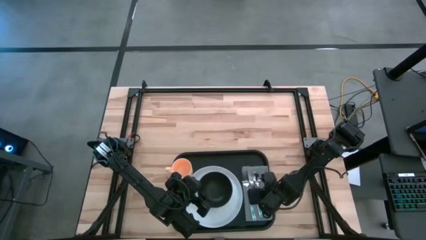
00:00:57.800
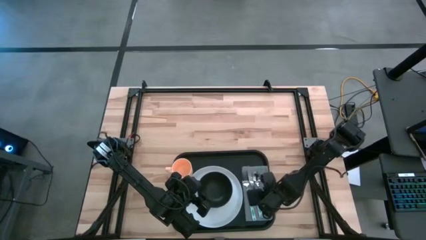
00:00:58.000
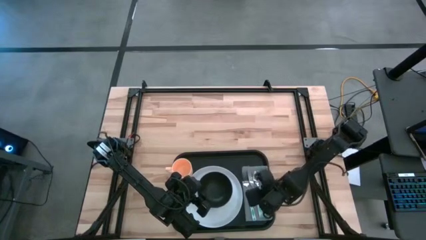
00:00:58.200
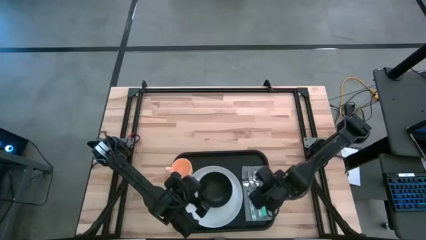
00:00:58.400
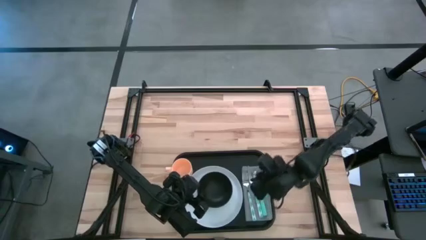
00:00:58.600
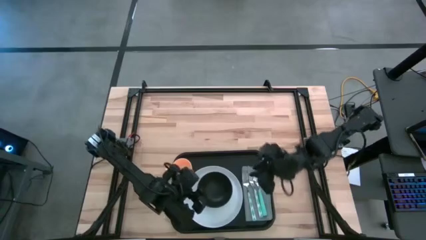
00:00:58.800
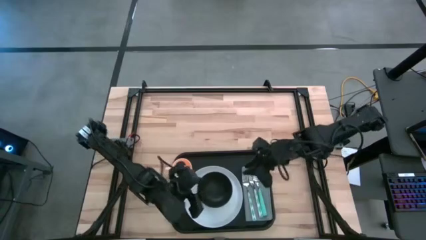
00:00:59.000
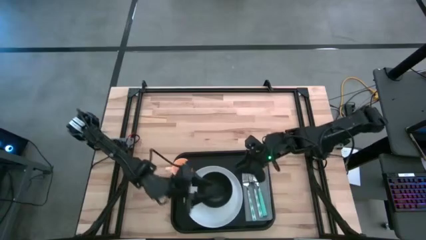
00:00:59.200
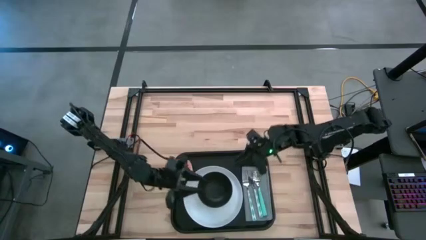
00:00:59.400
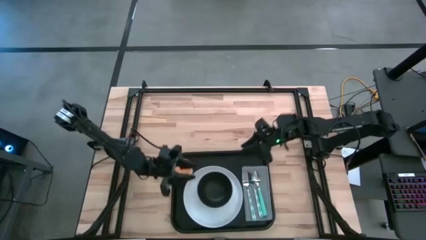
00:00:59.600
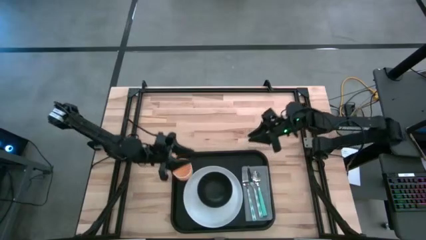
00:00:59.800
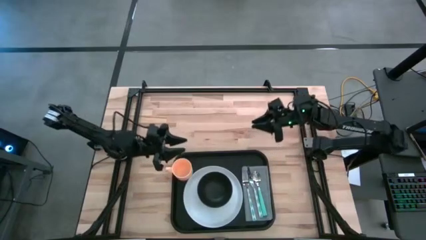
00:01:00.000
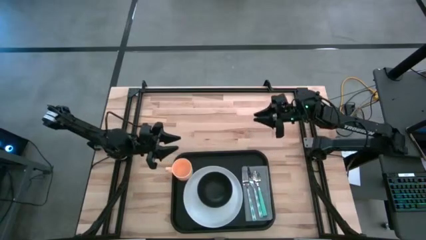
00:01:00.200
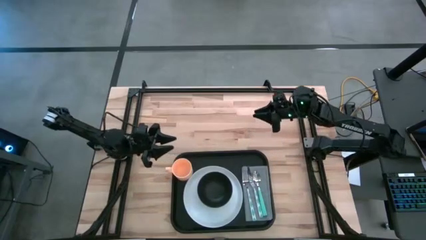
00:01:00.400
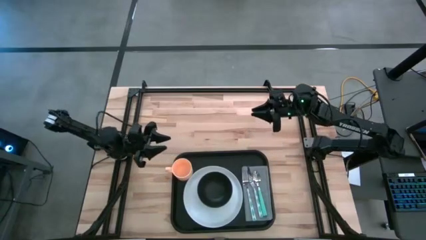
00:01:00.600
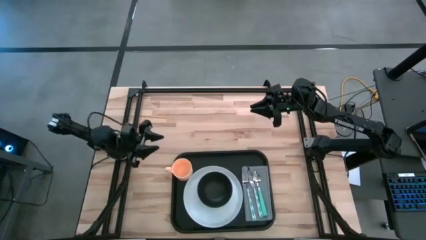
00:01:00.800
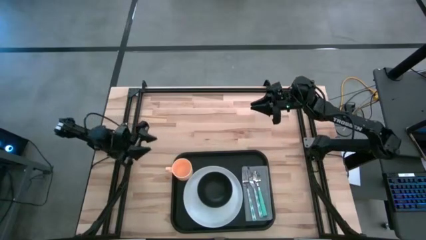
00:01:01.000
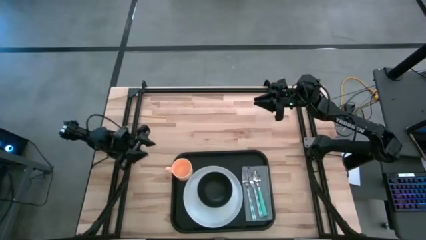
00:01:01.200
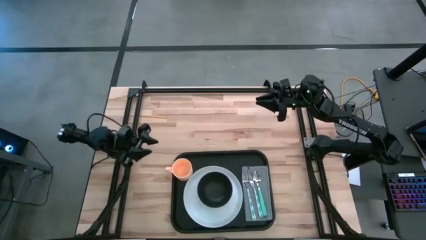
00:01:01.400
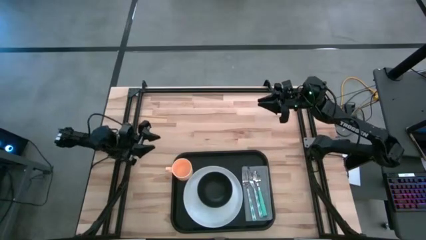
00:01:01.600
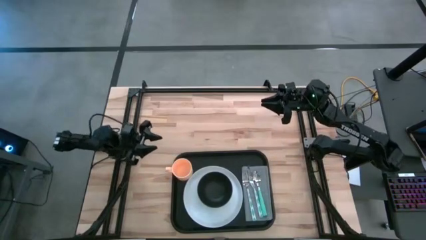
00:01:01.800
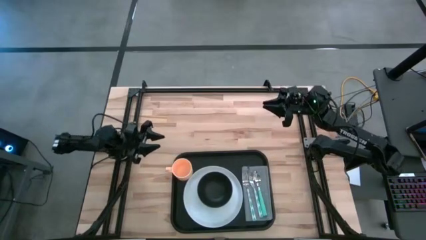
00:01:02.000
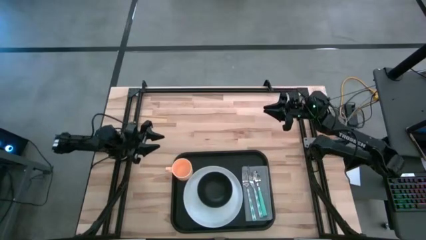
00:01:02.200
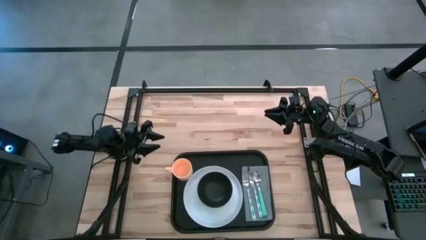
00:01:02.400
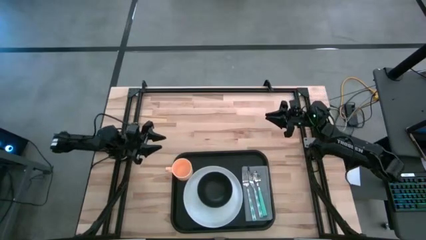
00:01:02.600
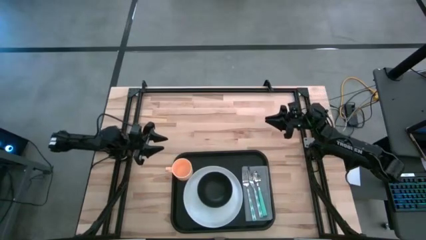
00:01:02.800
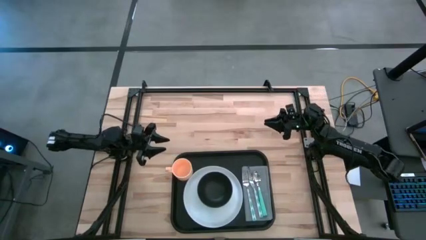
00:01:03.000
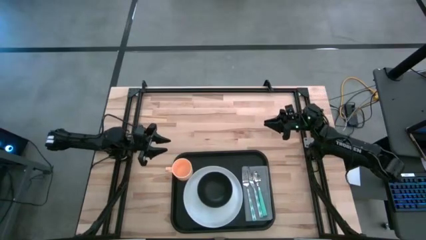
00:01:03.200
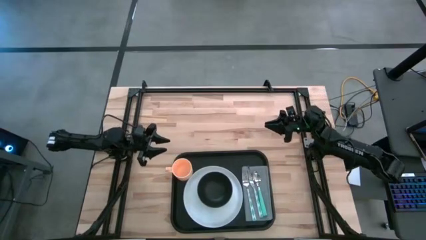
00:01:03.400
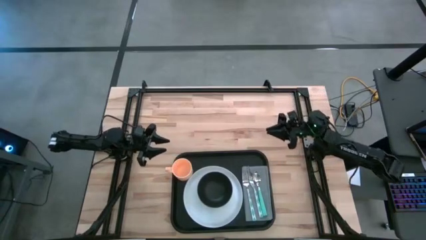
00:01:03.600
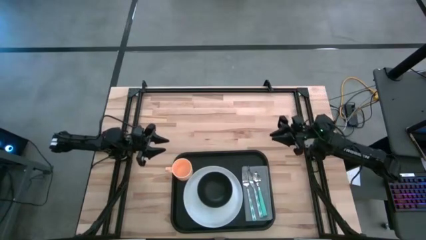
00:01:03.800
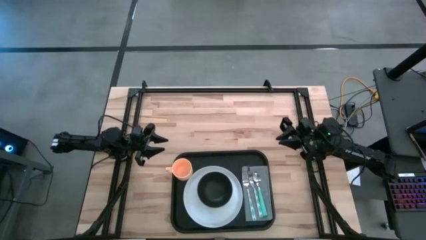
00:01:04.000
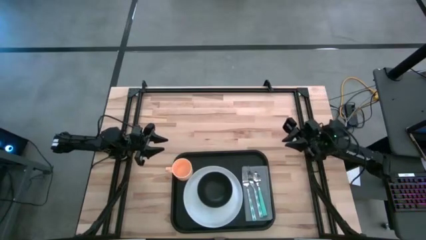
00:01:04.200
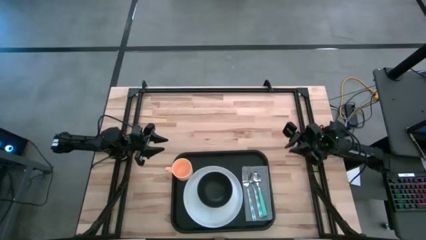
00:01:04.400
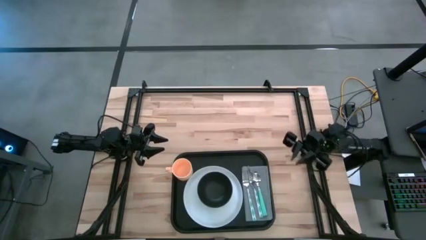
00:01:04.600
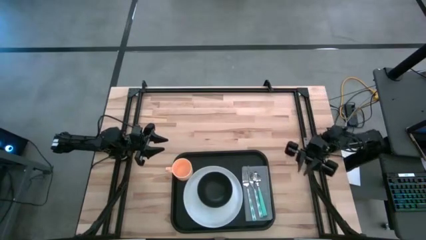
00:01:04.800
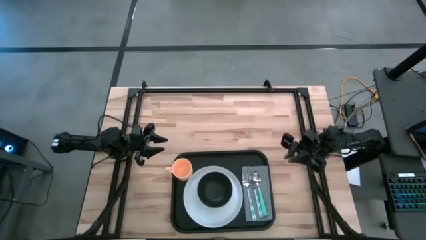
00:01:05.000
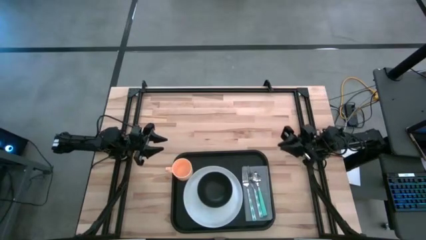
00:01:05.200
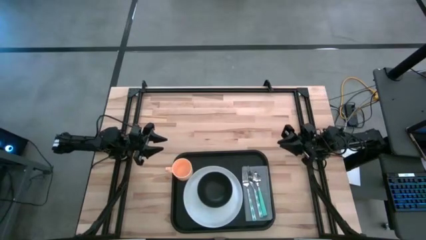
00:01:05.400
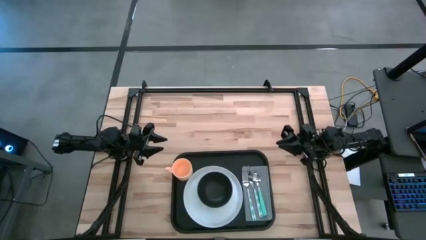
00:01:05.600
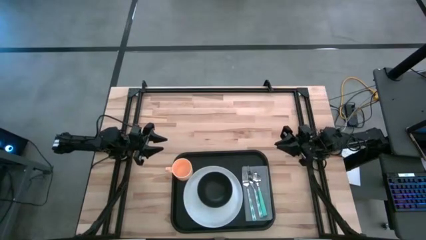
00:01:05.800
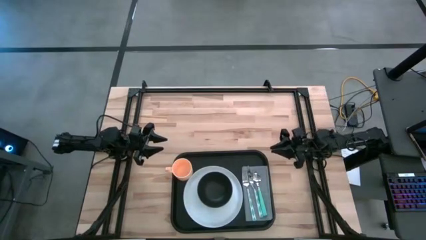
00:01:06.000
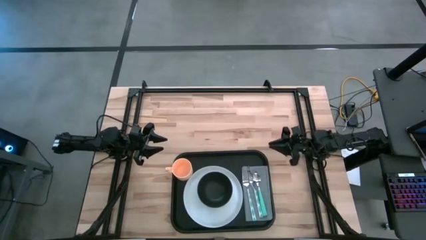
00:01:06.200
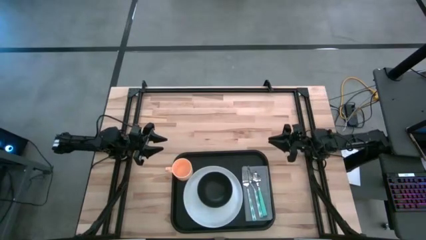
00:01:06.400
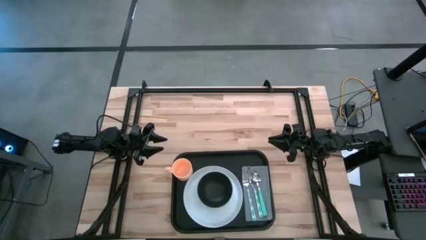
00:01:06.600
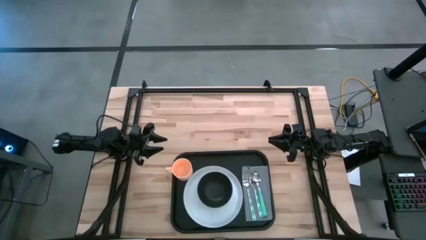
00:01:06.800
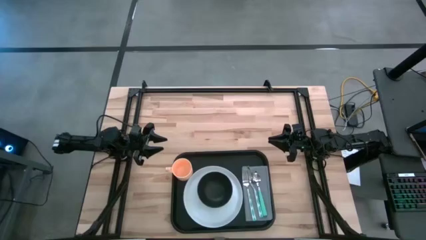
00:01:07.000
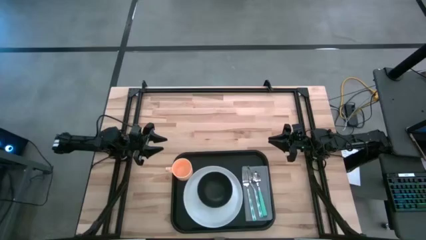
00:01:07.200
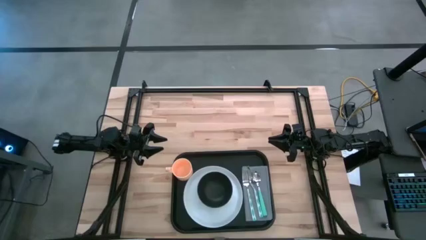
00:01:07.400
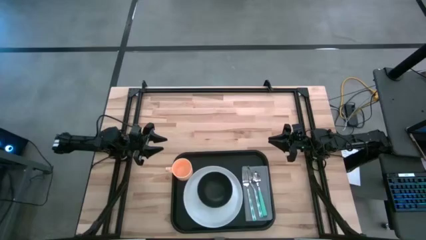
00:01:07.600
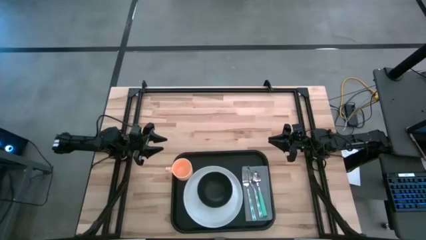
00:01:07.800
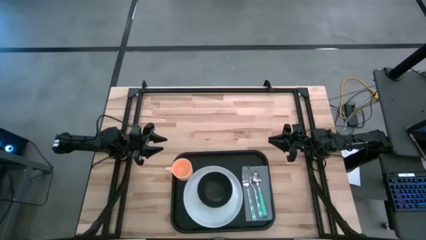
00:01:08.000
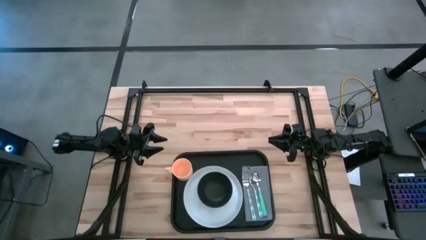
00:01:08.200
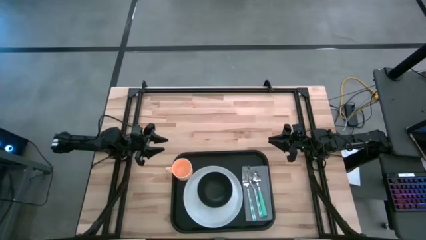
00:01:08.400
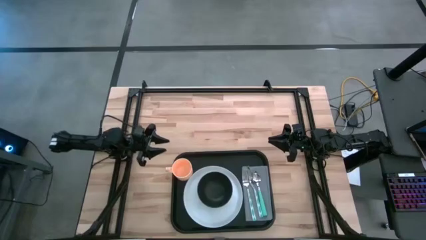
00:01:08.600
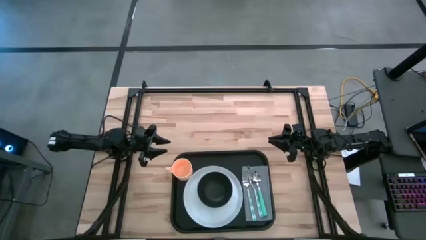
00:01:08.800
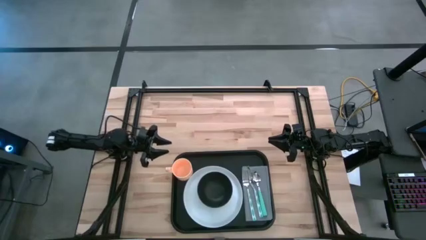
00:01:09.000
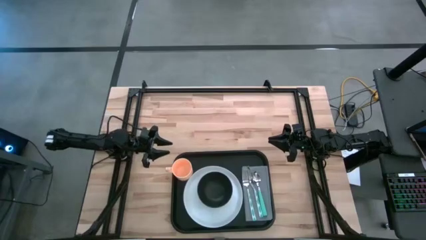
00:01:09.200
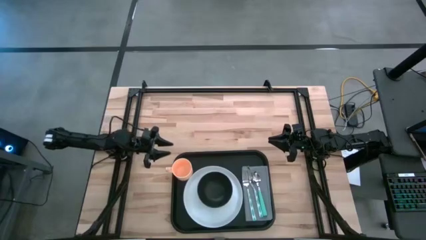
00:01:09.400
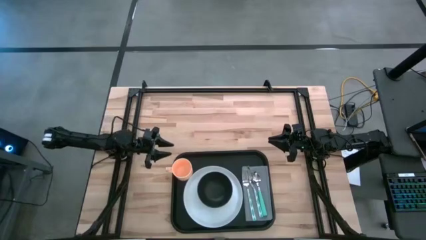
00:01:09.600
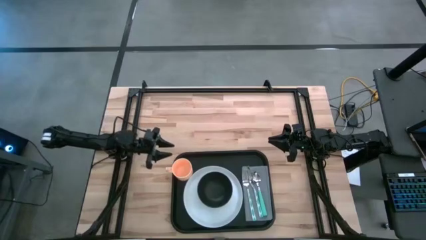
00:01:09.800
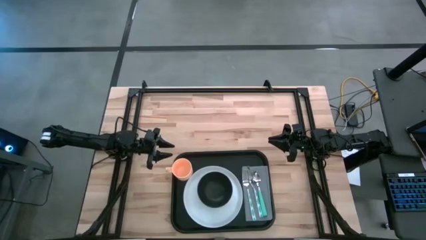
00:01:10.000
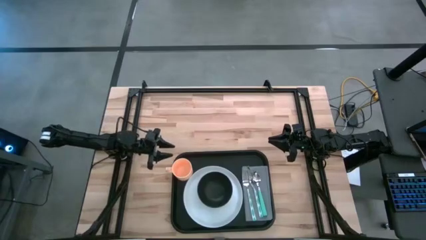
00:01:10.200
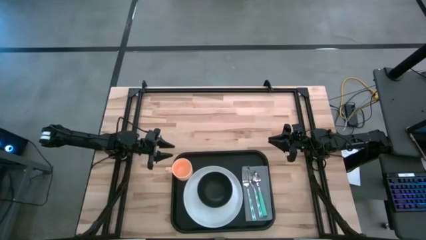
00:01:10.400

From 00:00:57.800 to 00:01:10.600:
Task: Set up tray
Return to home position
